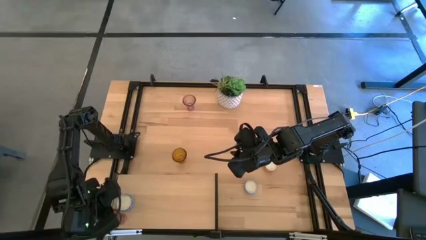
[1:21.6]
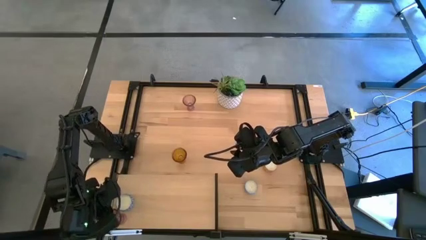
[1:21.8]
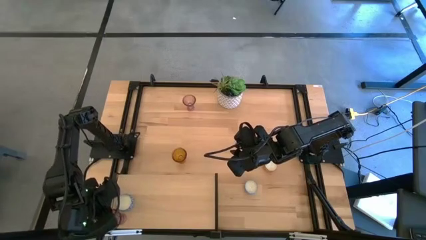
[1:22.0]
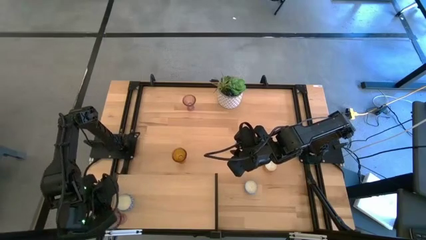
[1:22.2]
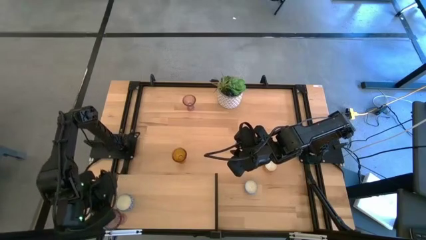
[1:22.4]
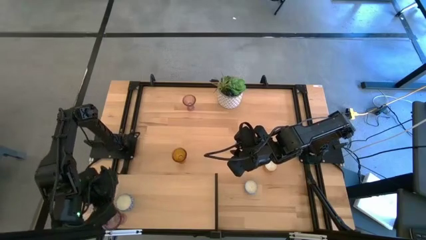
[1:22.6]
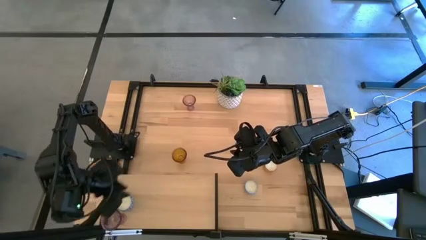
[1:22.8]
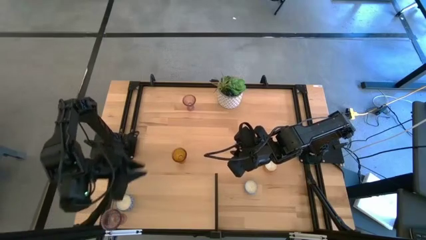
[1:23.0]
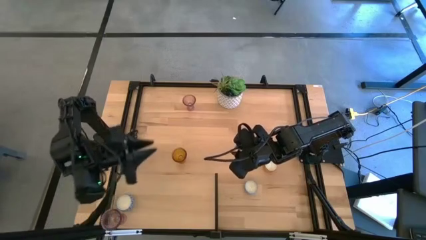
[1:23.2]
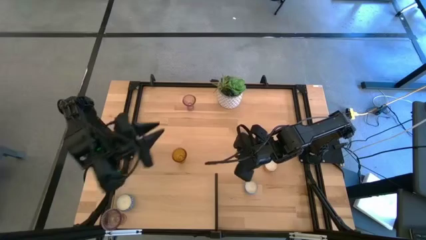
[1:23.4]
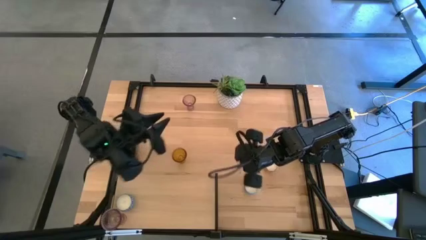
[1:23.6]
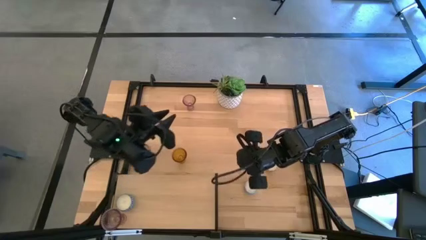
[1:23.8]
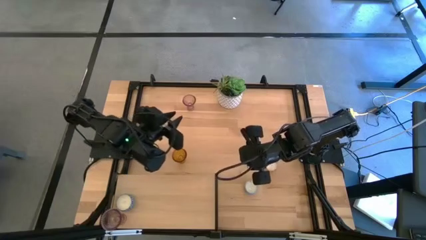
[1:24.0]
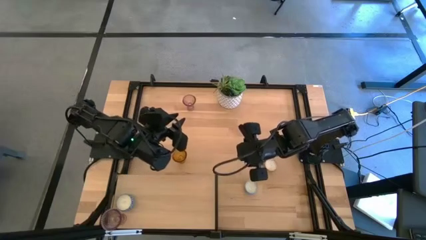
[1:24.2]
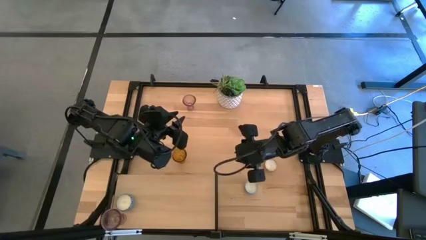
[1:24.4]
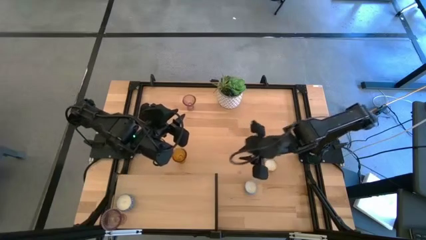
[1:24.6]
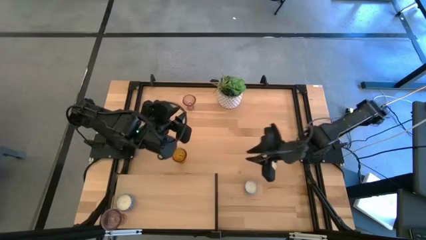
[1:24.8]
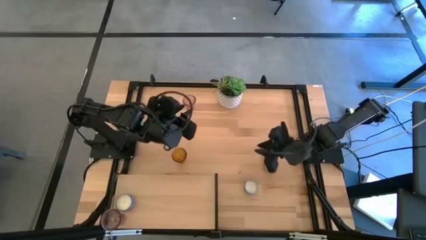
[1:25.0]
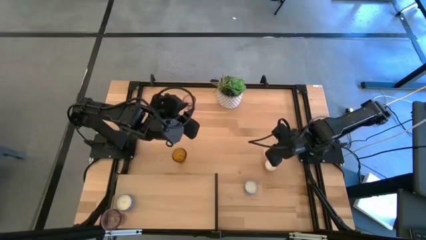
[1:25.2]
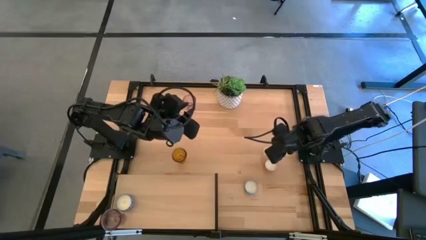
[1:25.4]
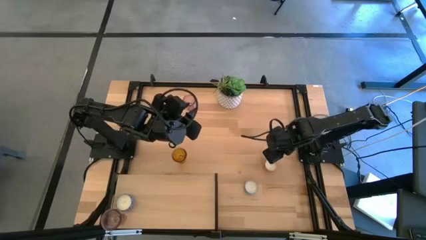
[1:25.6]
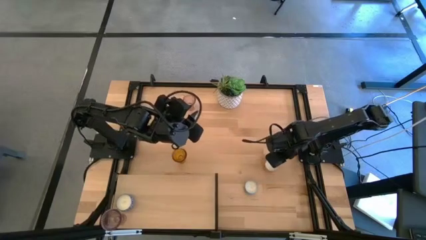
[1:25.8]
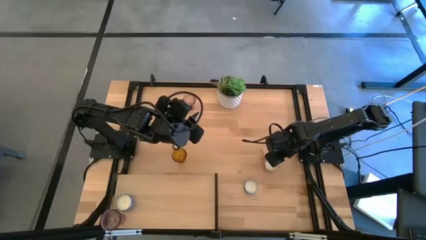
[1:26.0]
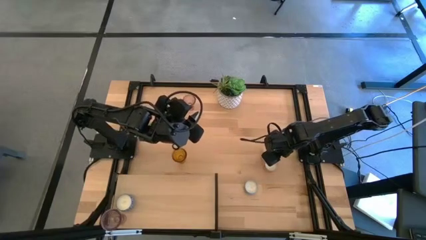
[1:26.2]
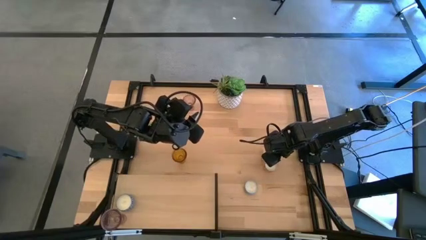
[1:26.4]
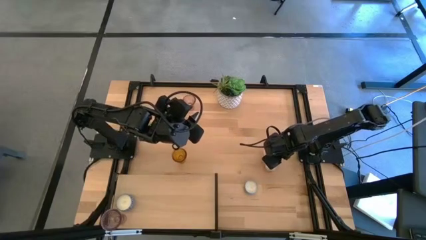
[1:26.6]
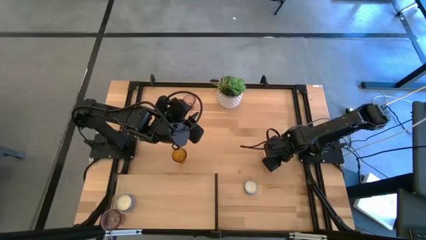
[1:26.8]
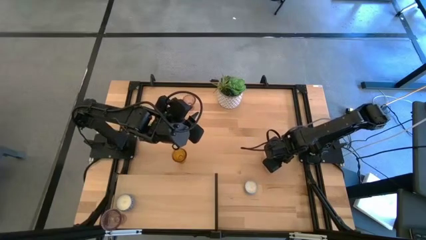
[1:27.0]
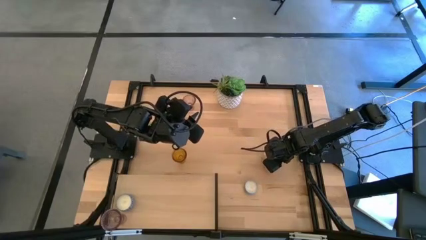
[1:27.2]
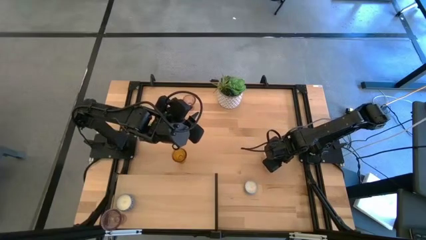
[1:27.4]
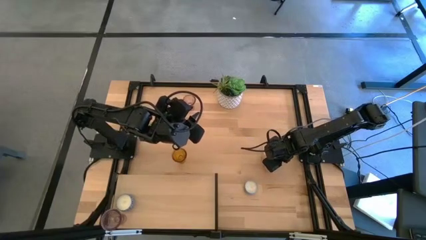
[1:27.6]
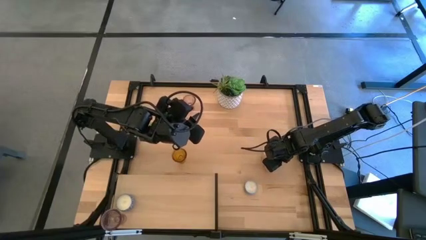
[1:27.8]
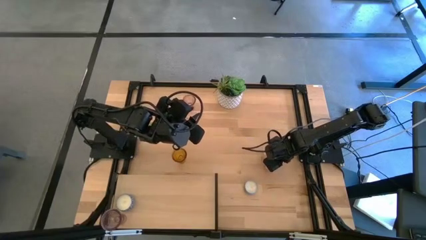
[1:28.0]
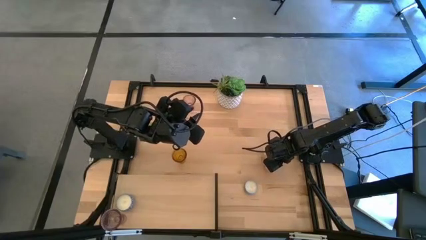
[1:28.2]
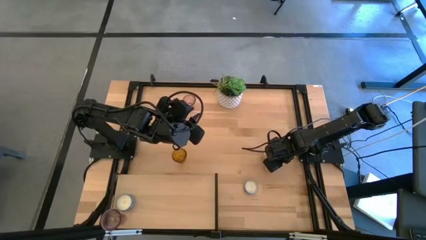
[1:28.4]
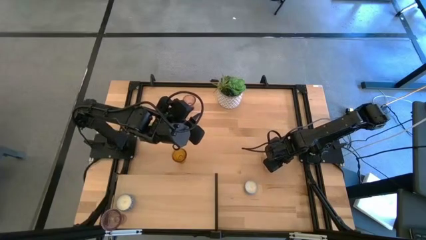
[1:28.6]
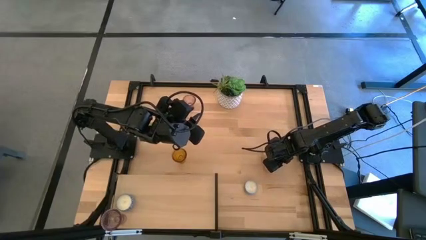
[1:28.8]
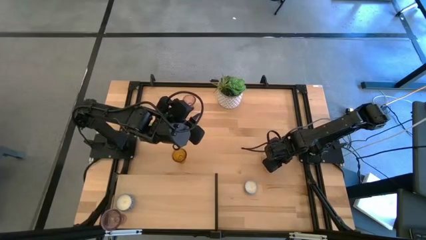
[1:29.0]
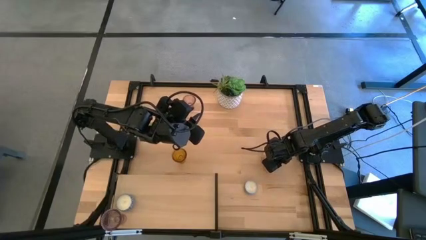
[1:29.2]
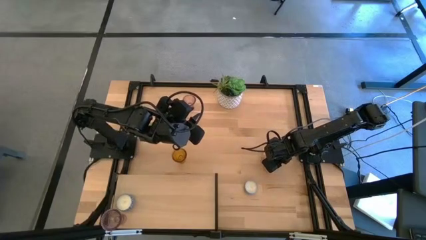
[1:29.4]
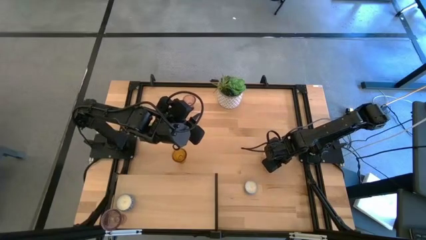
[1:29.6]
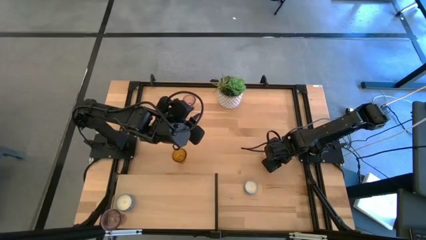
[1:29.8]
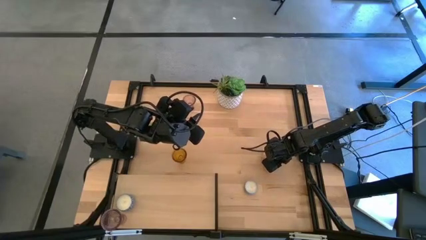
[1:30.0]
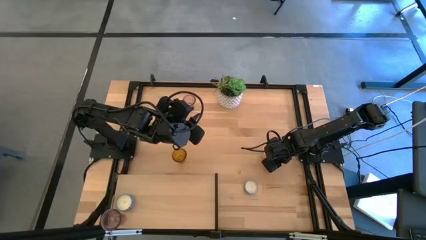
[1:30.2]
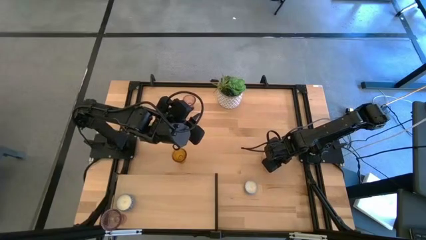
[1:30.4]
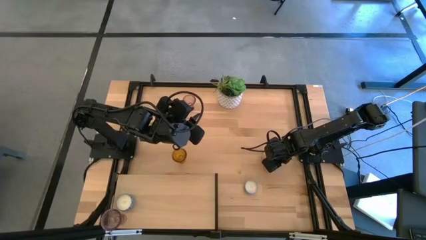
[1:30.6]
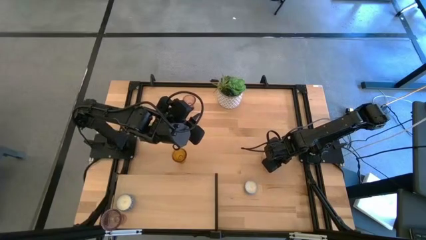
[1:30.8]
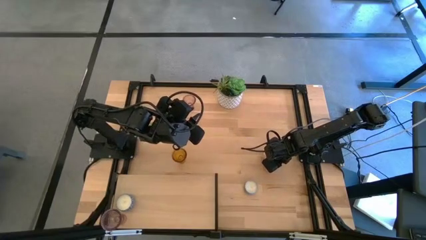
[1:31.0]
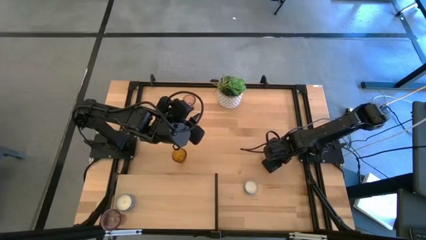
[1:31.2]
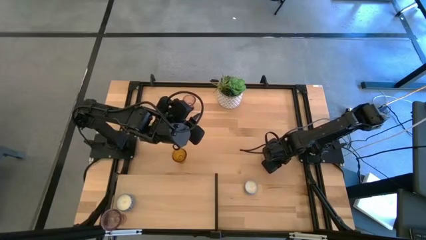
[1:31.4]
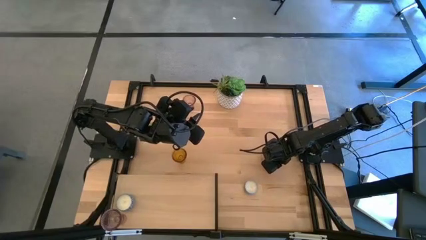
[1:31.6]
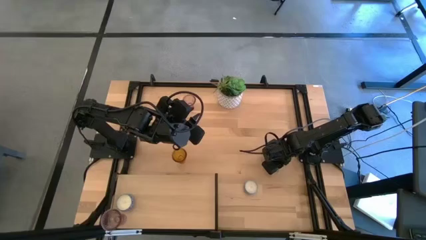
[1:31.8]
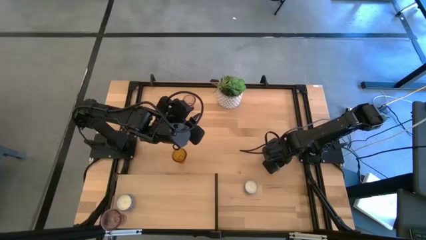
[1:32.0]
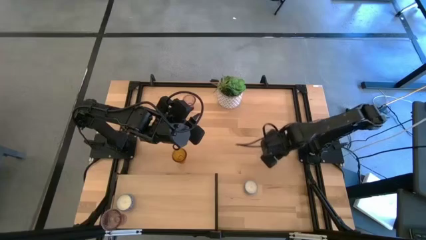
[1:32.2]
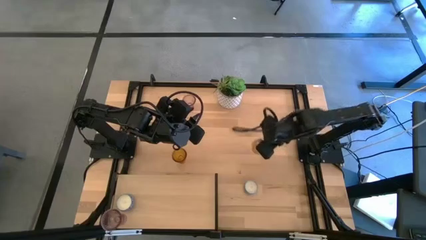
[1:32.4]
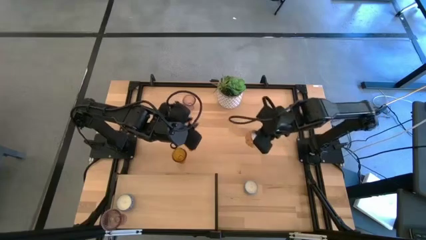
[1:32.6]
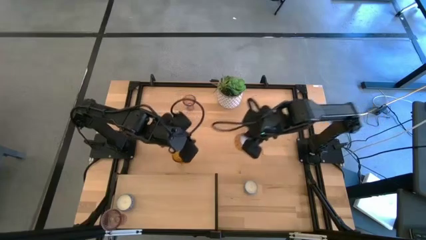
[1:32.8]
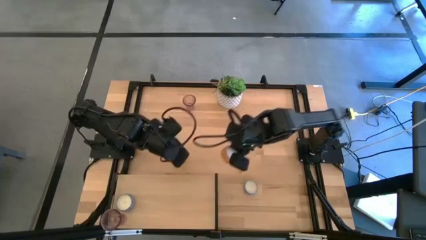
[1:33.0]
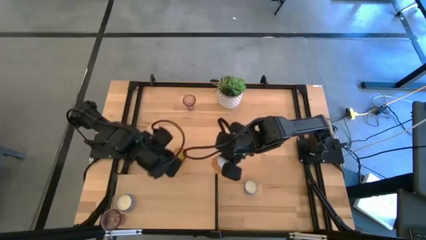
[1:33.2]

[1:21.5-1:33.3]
Task: Pick & Place candle stick holders
Put the orange scented candle on the shelf

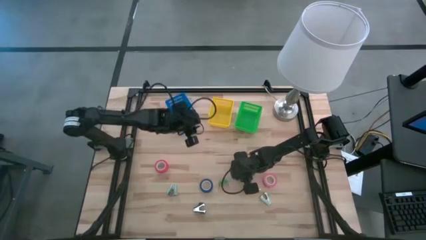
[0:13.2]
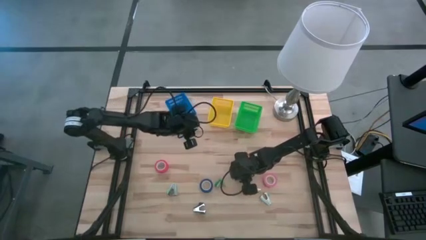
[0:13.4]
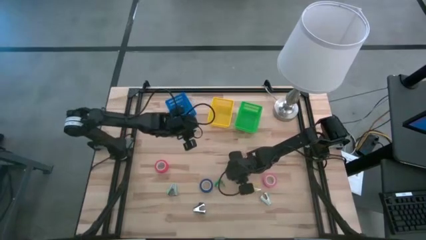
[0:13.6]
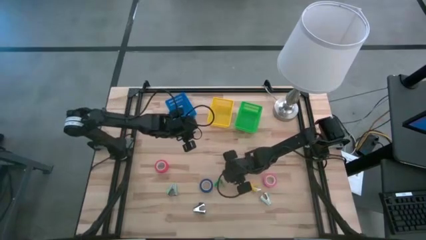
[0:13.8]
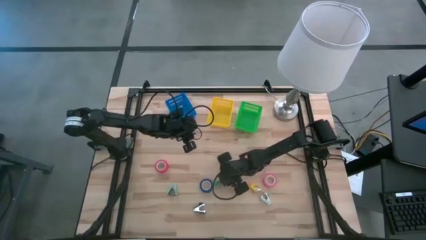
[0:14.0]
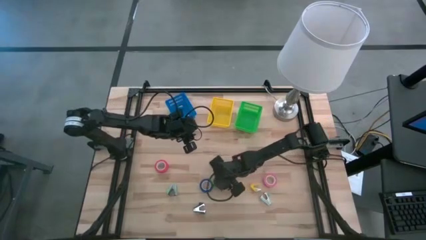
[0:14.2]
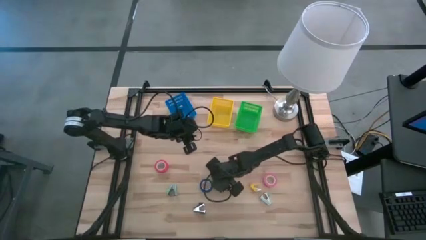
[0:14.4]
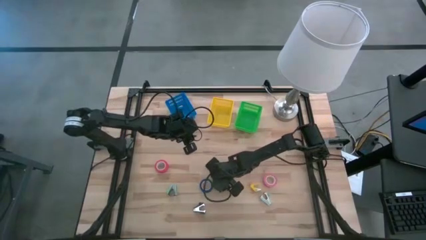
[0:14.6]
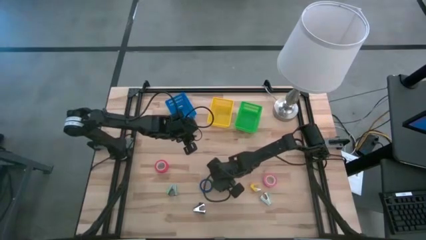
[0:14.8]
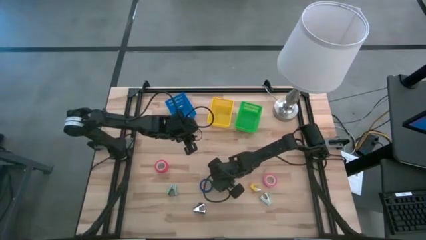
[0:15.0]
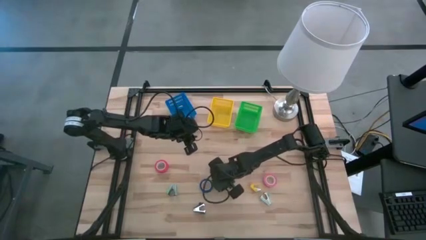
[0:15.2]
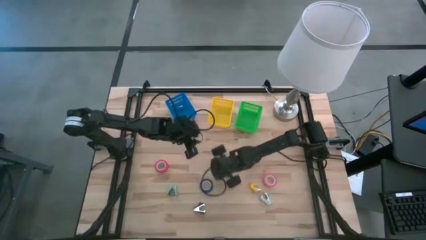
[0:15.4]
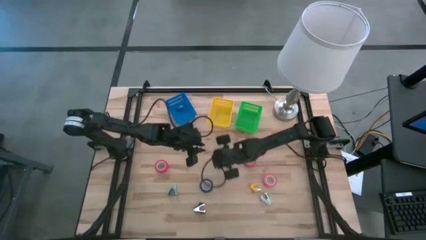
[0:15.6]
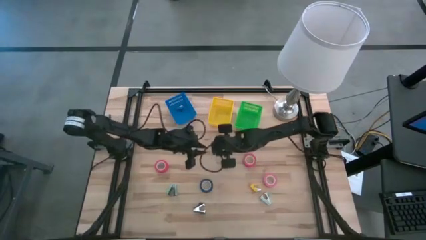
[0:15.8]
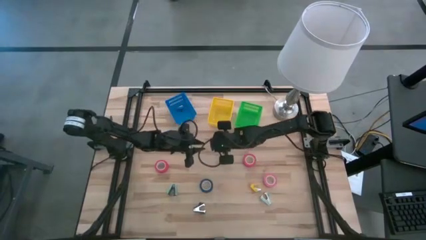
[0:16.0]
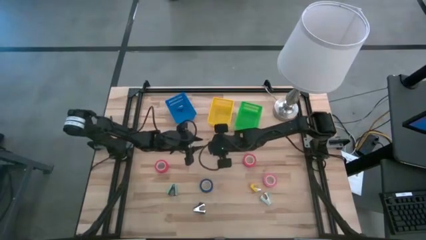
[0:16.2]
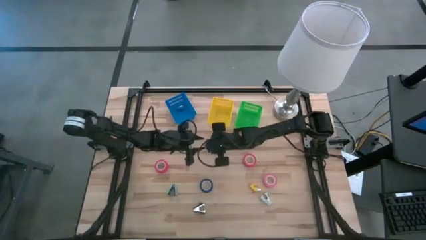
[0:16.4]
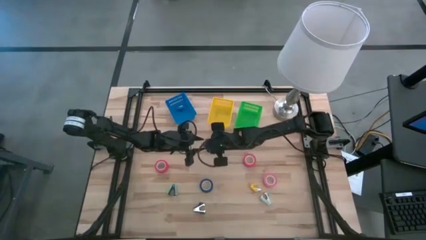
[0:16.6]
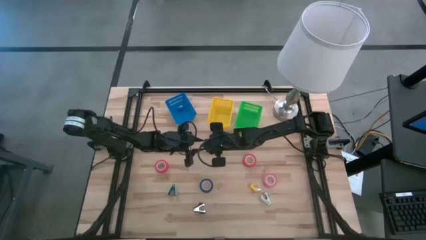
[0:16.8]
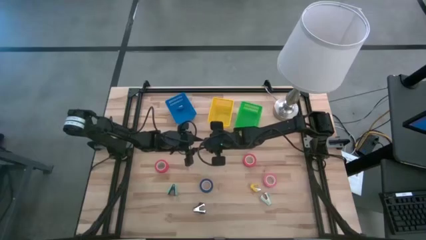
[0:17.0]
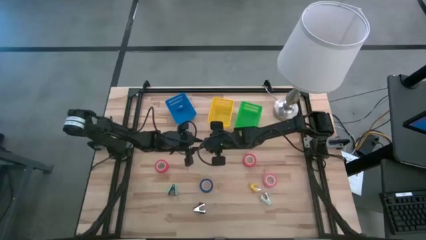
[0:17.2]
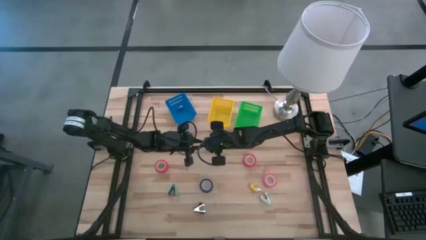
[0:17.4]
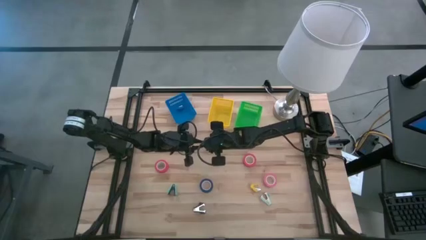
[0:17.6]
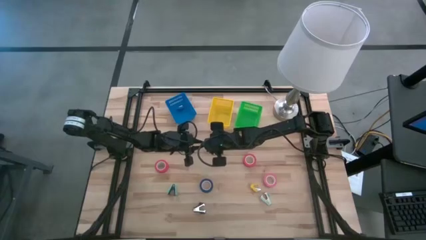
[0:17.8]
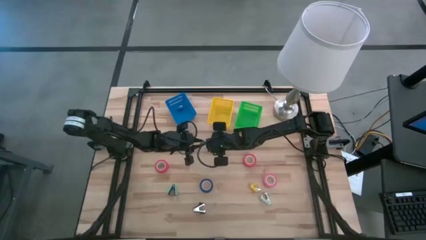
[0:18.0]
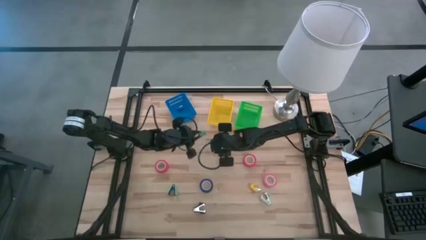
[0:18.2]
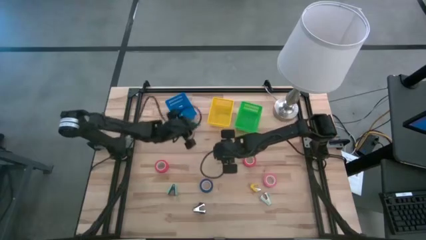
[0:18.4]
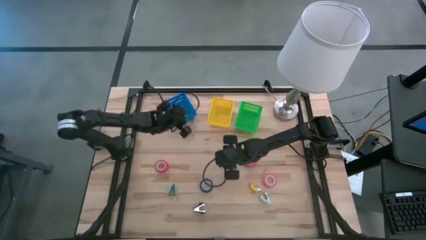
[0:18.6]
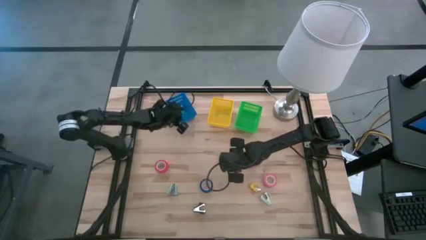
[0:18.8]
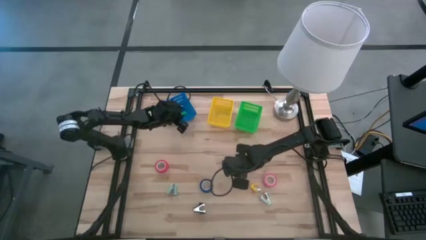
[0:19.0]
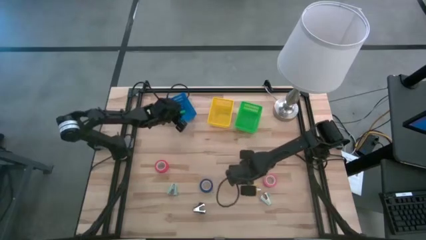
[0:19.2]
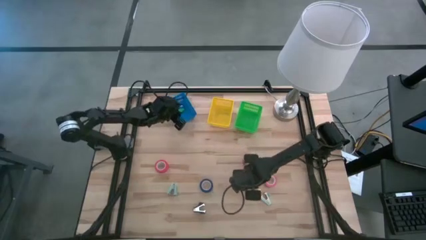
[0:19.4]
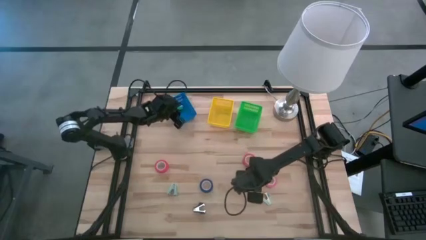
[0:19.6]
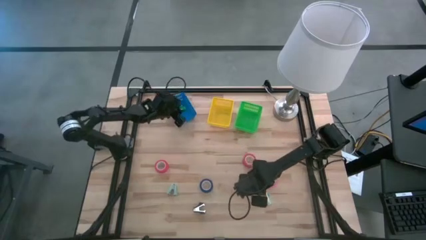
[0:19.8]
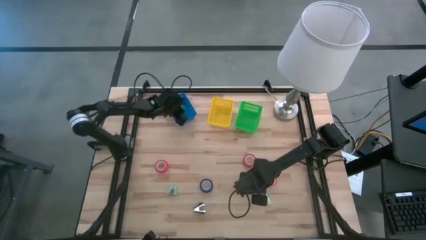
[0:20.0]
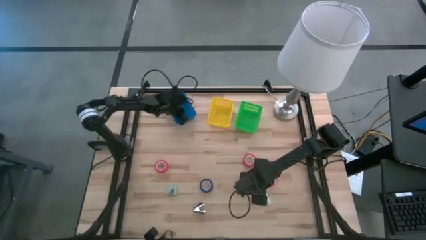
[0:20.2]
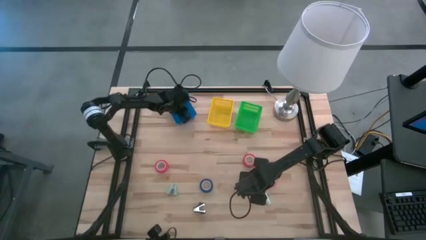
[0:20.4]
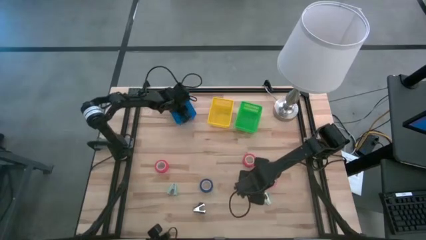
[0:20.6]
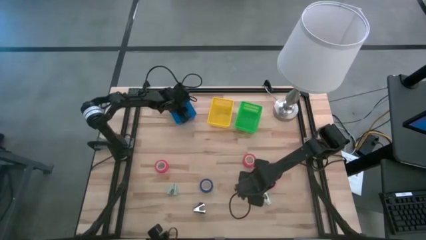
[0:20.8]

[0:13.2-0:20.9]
Task: Pick and place Stapler, Stapler remover, tape
Put the green stapler into the blue bin
